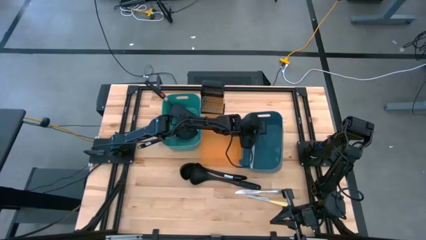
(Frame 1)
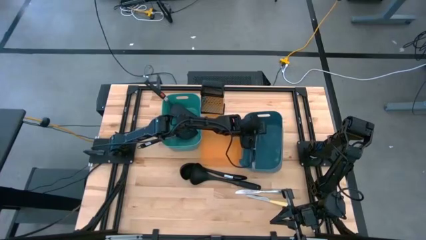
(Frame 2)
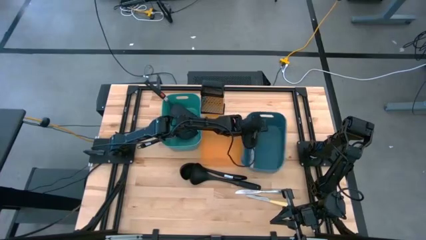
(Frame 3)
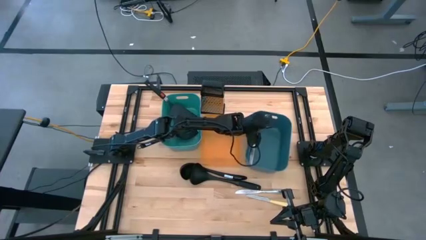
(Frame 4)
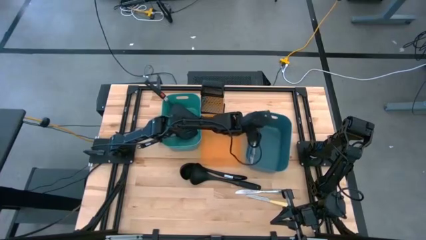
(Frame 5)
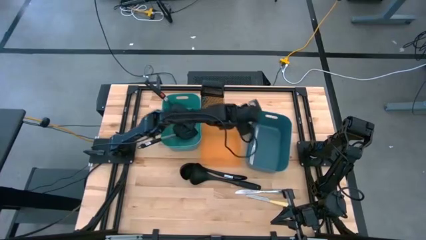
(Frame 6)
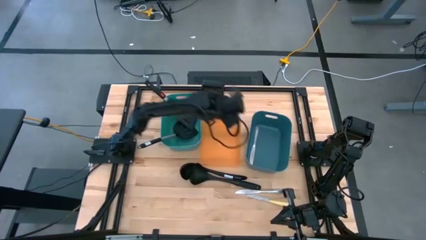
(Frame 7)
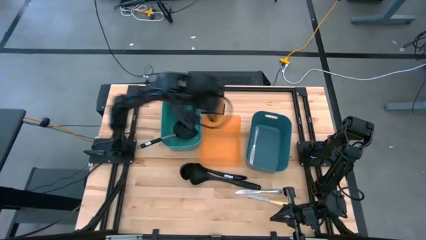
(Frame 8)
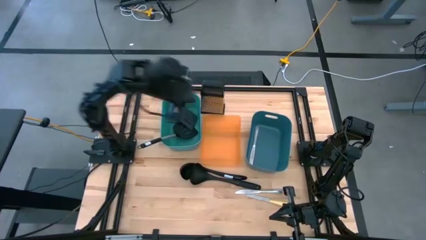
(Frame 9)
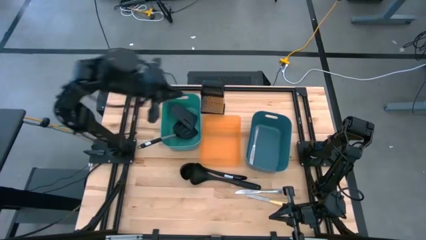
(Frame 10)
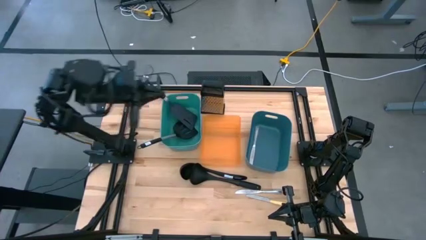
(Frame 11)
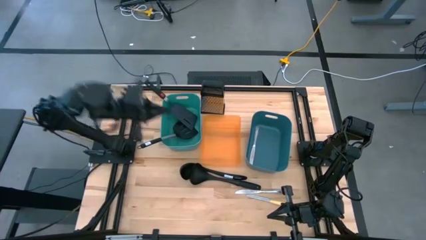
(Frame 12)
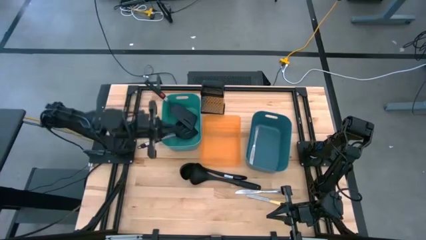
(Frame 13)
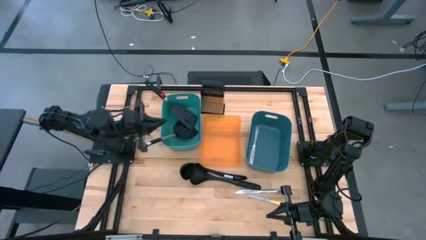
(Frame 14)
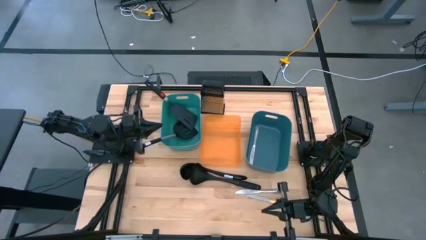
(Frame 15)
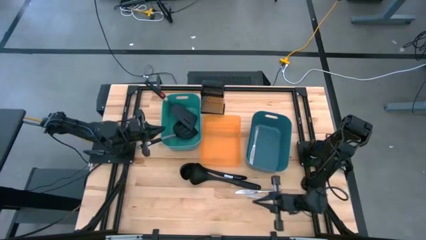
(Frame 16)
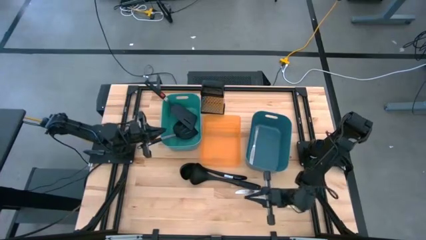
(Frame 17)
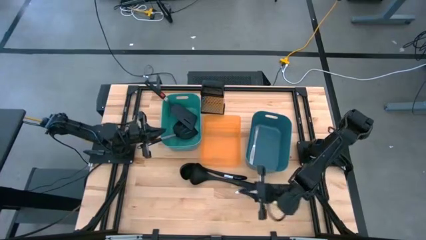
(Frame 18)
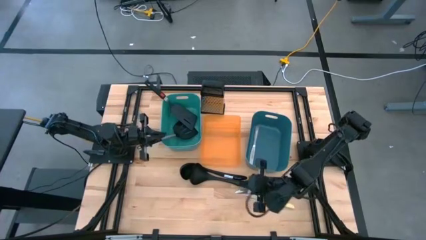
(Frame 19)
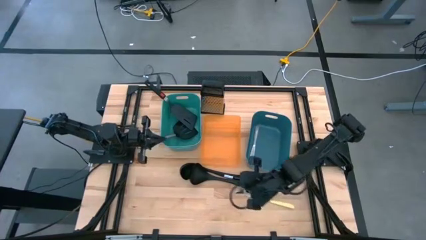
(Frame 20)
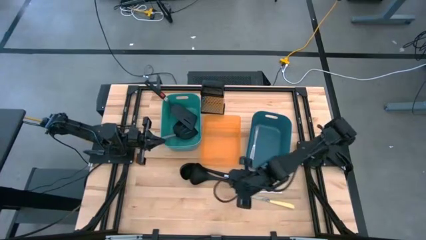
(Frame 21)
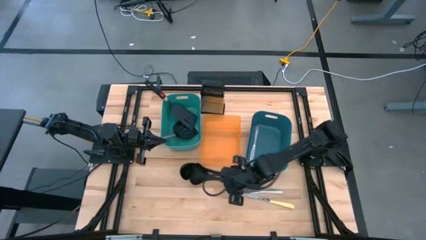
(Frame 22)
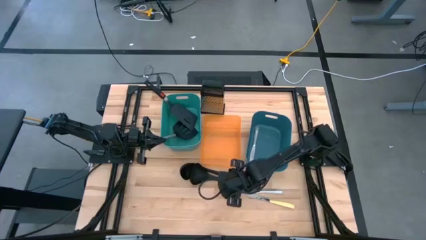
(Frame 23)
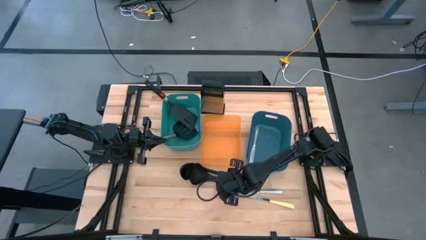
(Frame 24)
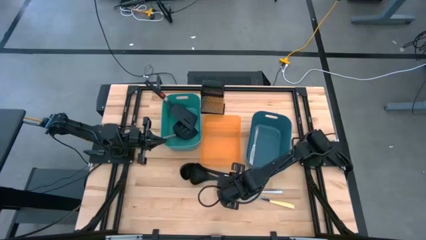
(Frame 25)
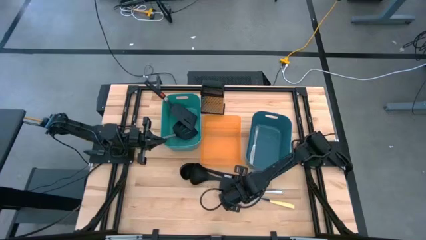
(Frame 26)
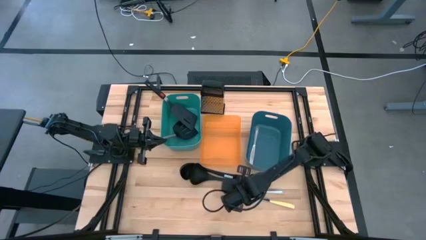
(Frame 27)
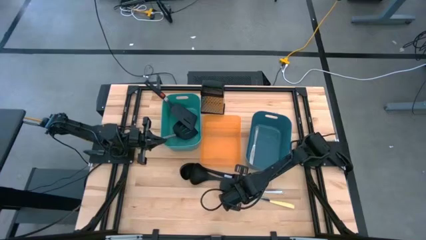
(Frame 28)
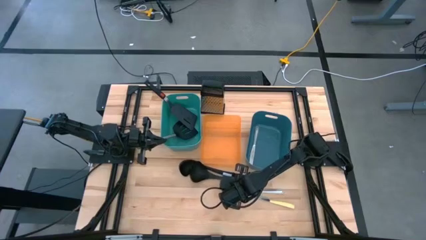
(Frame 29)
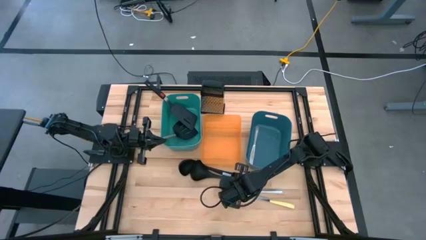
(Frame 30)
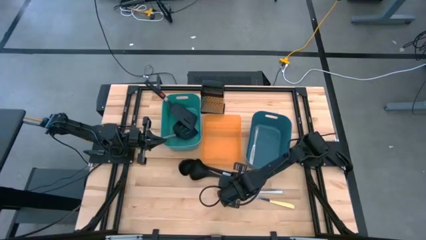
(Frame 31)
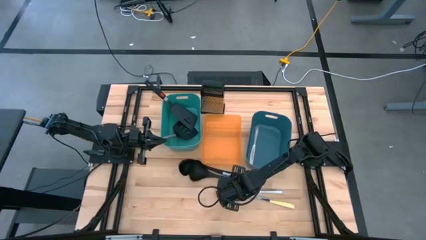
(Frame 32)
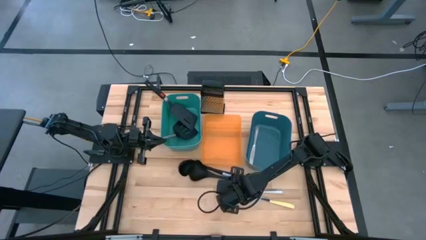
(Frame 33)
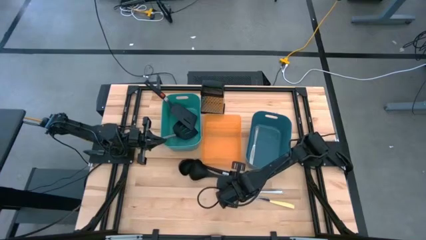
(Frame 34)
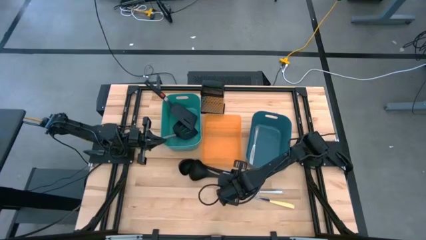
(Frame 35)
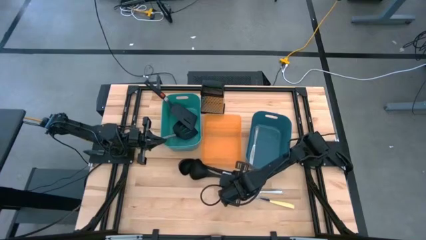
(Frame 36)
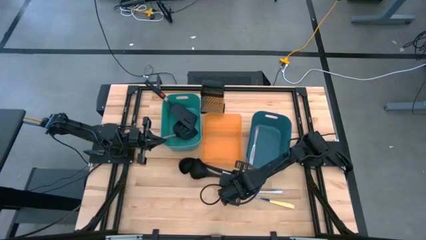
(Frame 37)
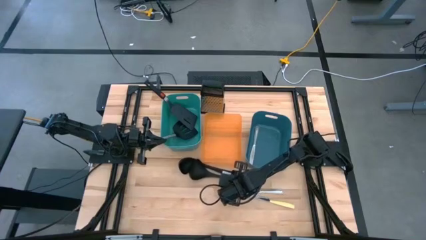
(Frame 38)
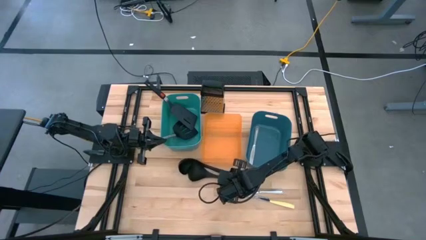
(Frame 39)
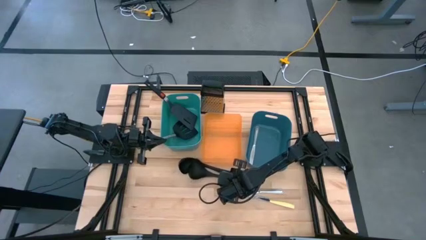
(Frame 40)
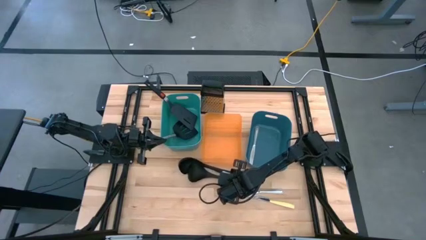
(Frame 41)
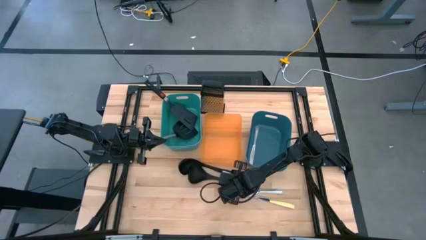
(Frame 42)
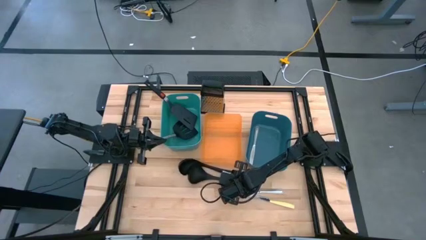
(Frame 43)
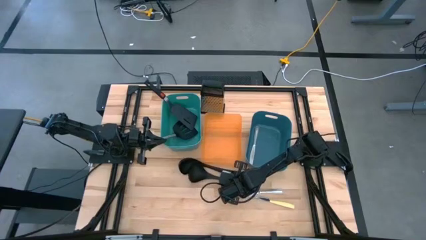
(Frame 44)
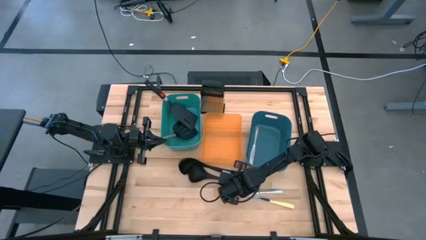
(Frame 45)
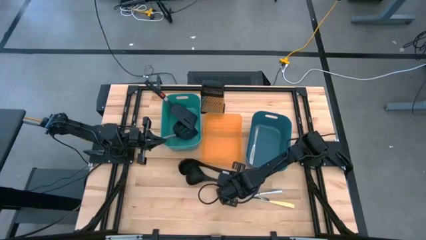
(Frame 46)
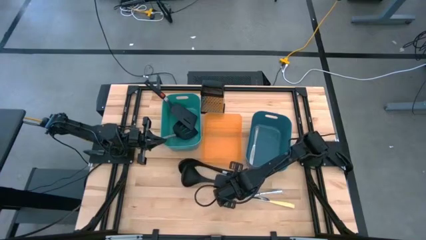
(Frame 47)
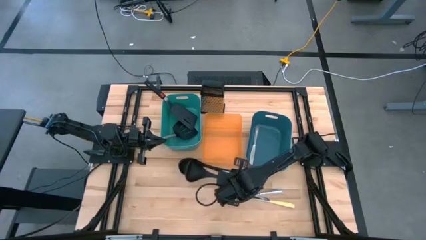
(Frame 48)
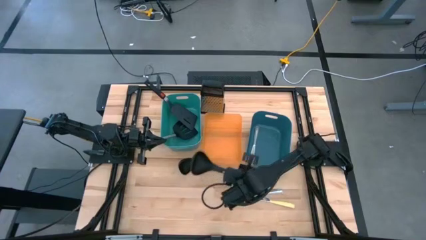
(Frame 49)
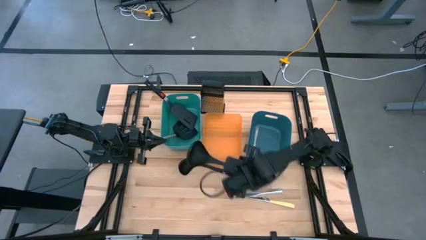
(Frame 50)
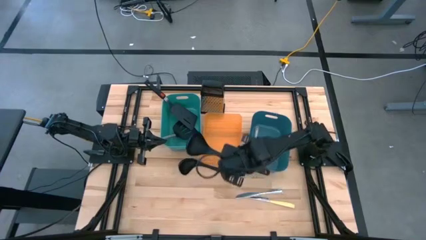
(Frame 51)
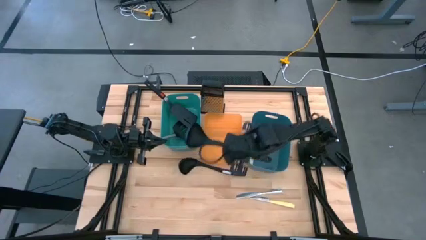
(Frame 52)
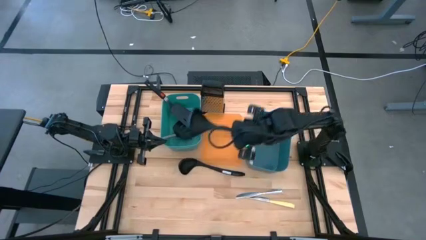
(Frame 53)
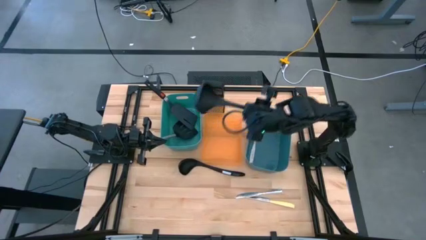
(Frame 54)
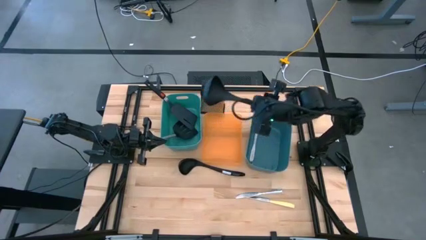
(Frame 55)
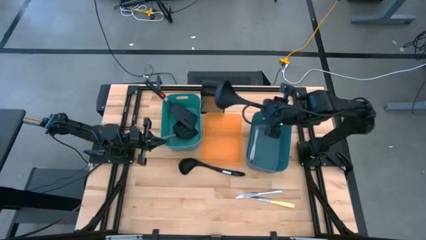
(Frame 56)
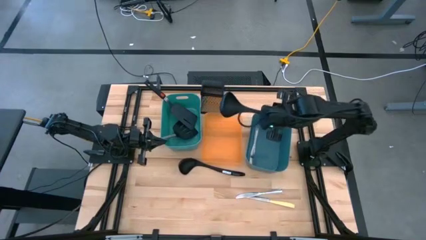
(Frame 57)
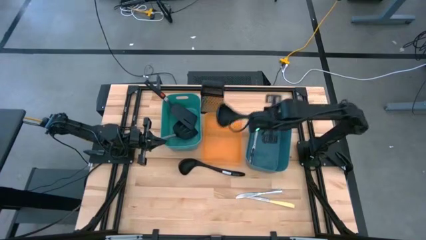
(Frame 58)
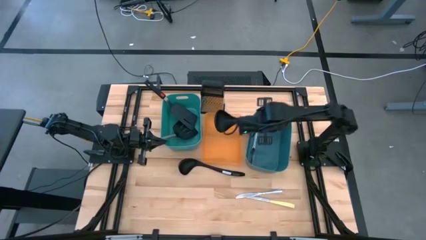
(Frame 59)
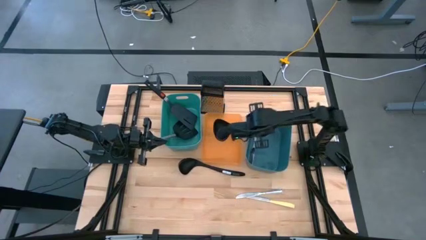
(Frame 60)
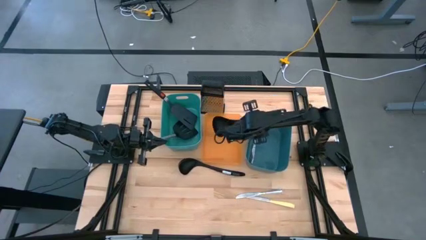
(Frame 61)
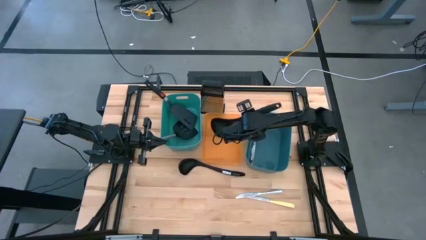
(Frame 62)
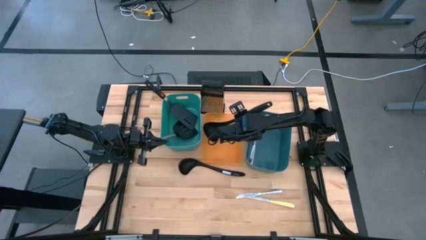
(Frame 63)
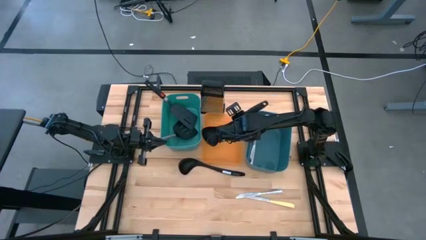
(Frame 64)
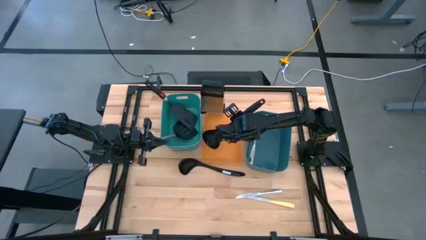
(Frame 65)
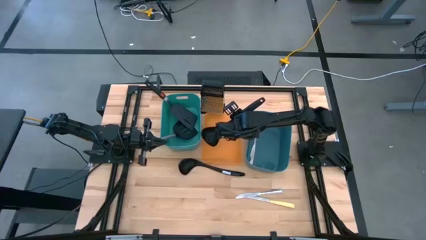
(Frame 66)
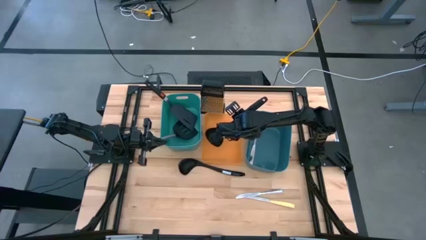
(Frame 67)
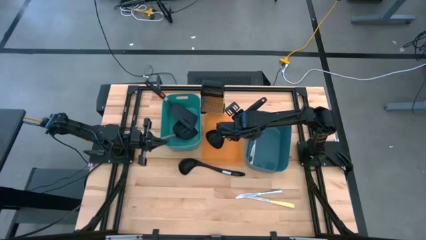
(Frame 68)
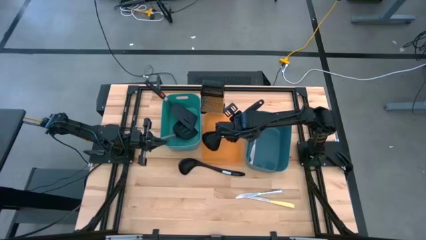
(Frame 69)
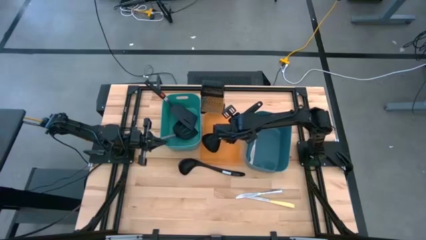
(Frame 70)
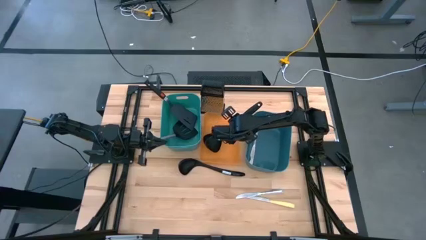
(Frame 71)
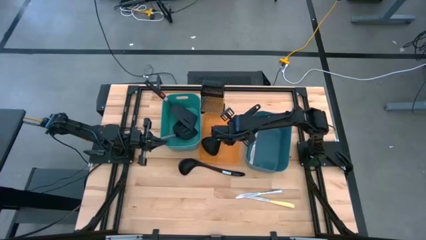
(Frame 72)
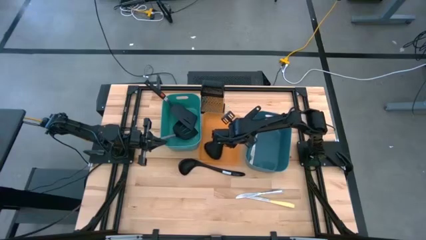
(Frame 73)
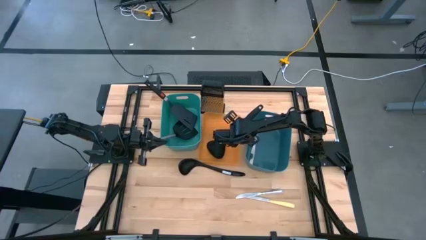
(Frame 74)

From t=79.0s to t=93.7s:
Task: Pick & Place Kitchen Items
Put the bottom black serving spoon into the orange bin
